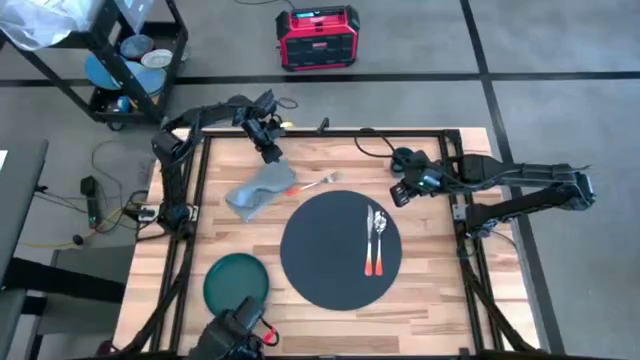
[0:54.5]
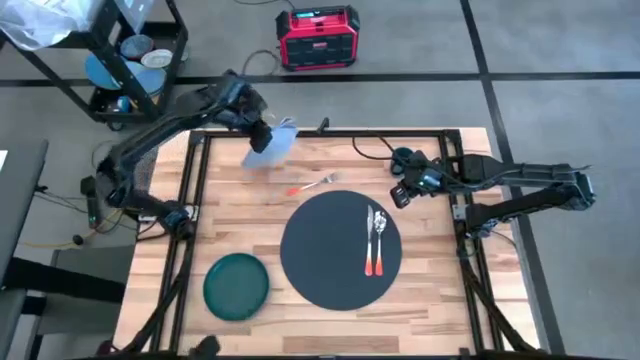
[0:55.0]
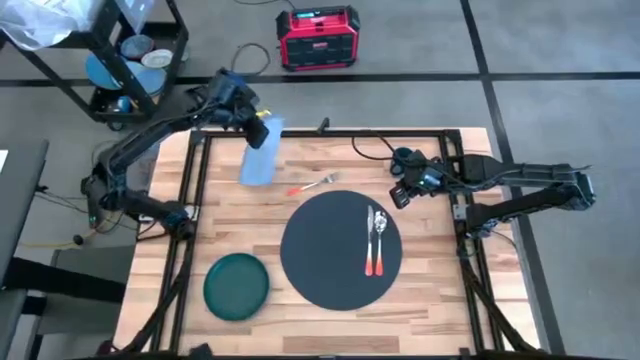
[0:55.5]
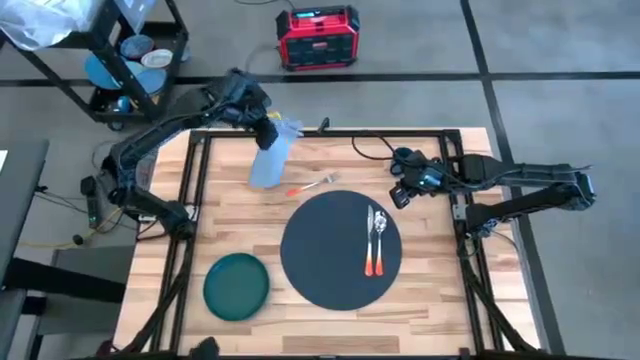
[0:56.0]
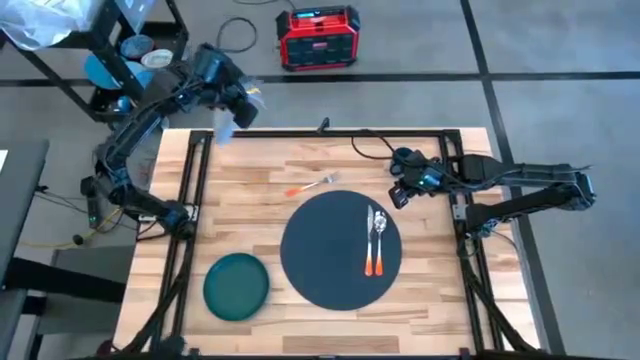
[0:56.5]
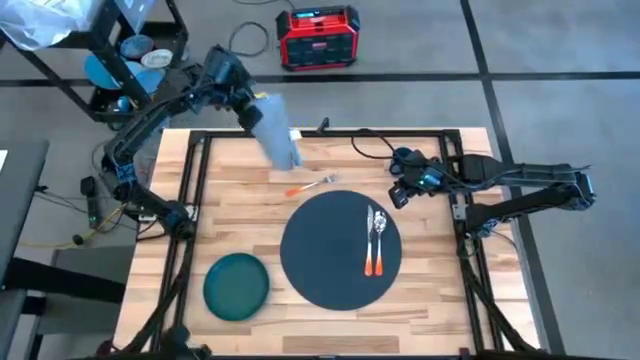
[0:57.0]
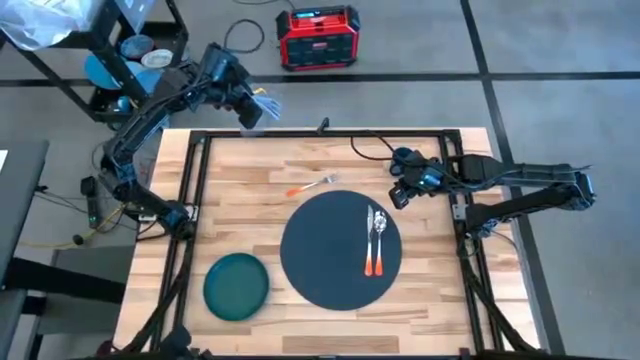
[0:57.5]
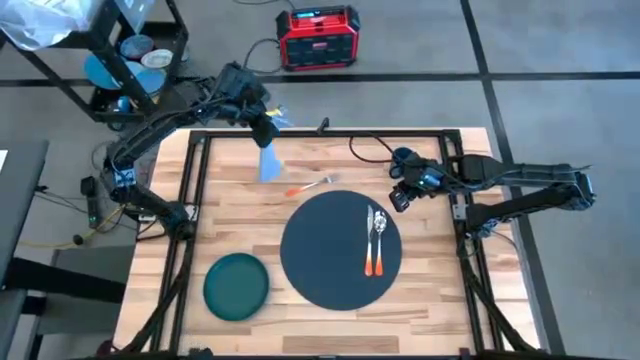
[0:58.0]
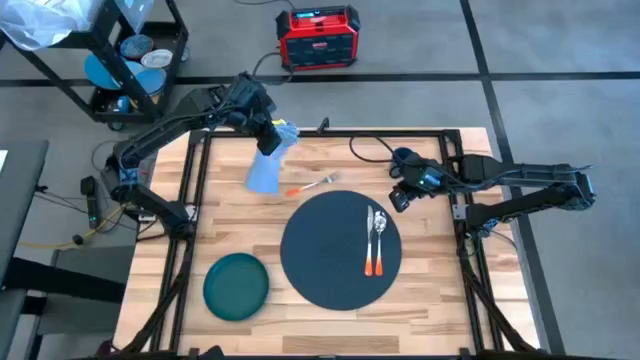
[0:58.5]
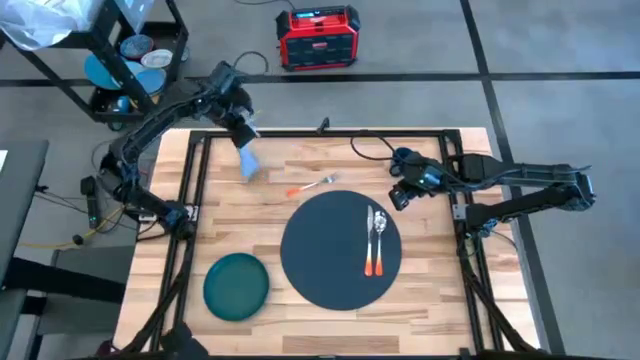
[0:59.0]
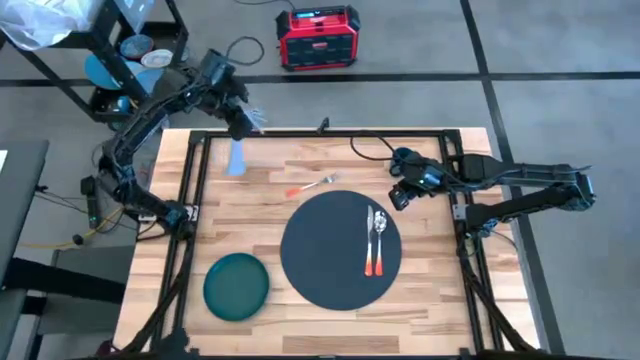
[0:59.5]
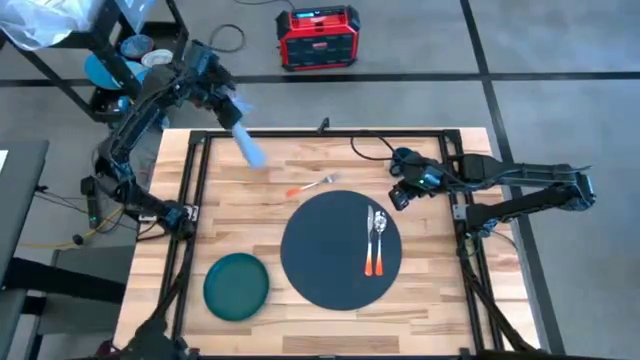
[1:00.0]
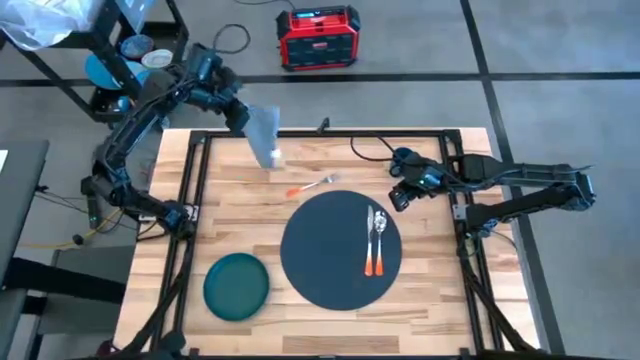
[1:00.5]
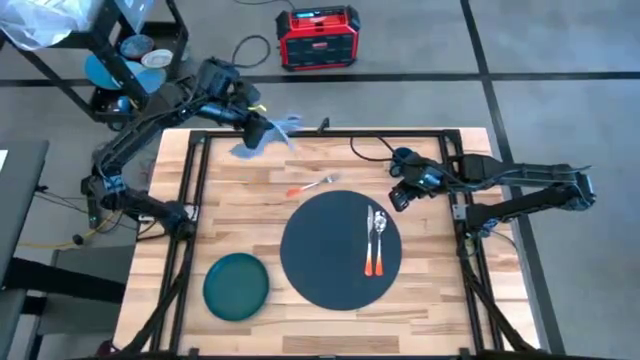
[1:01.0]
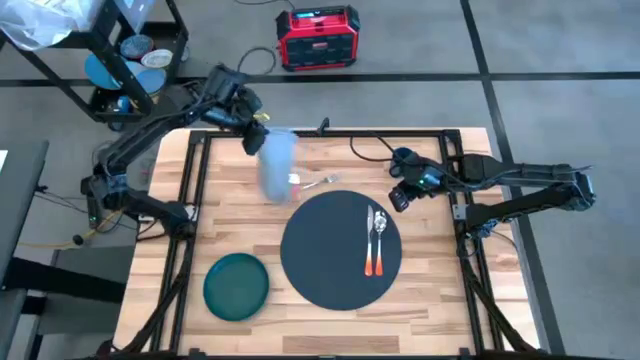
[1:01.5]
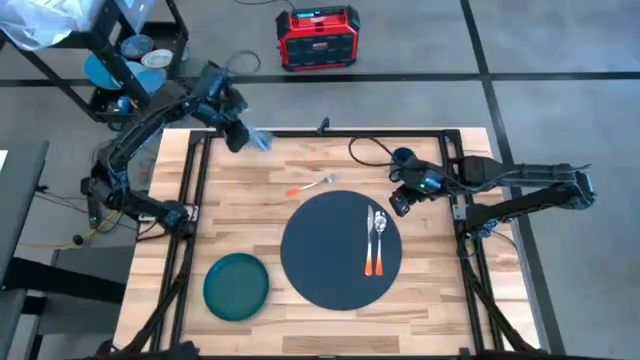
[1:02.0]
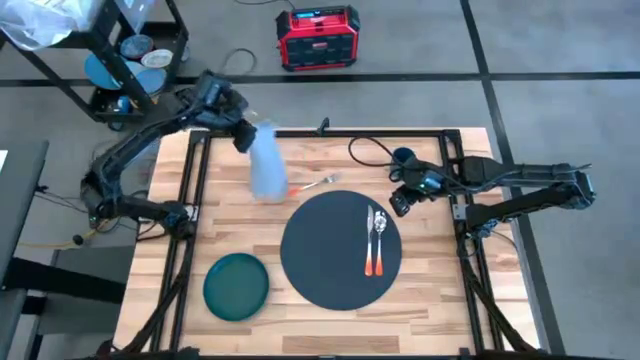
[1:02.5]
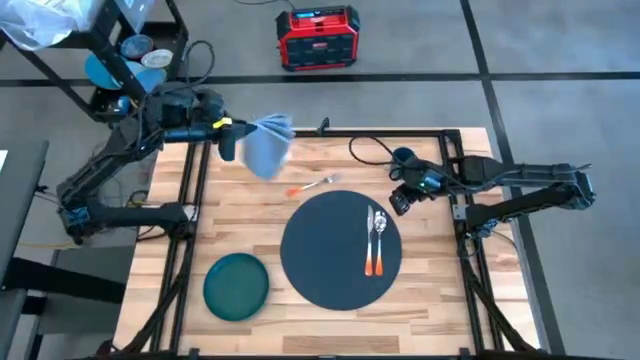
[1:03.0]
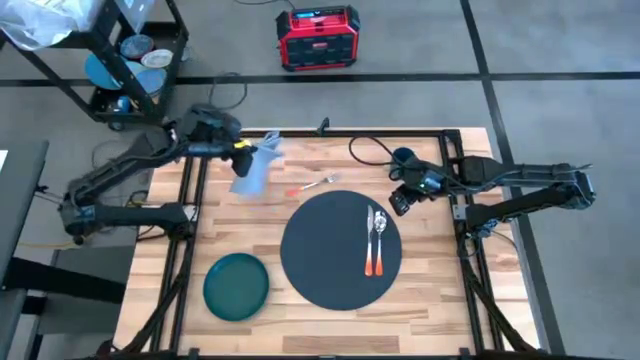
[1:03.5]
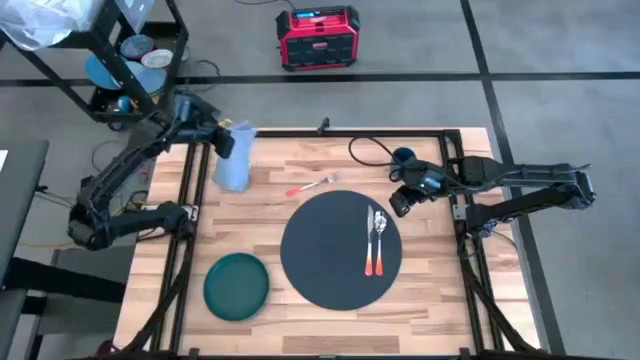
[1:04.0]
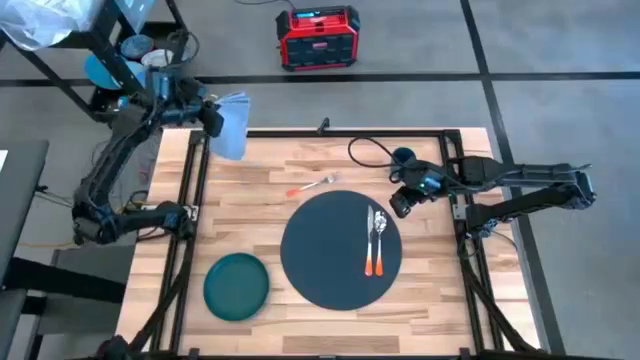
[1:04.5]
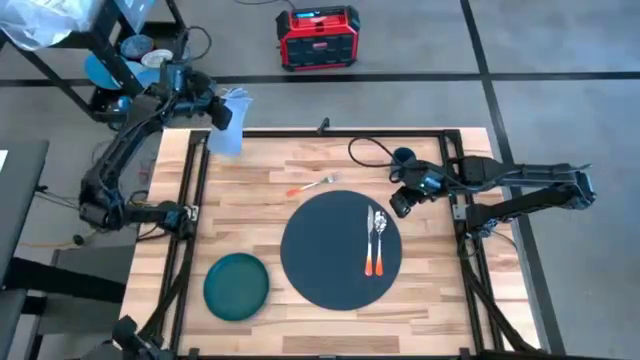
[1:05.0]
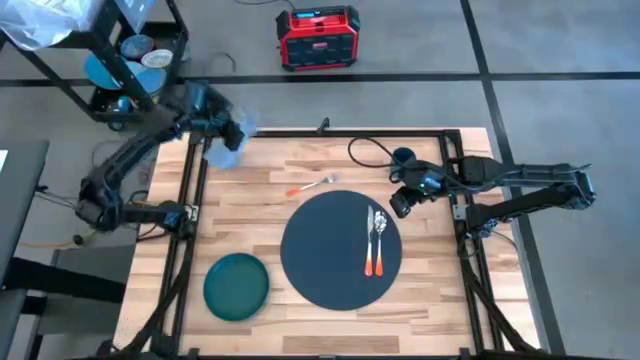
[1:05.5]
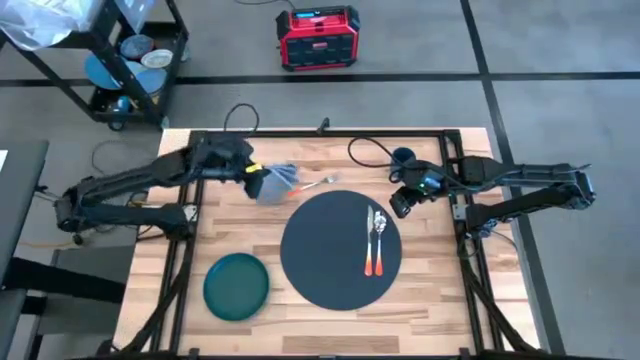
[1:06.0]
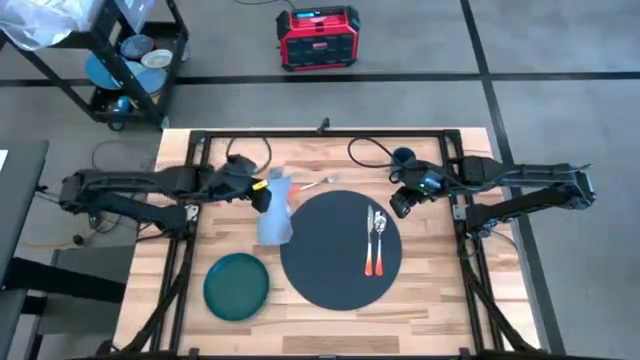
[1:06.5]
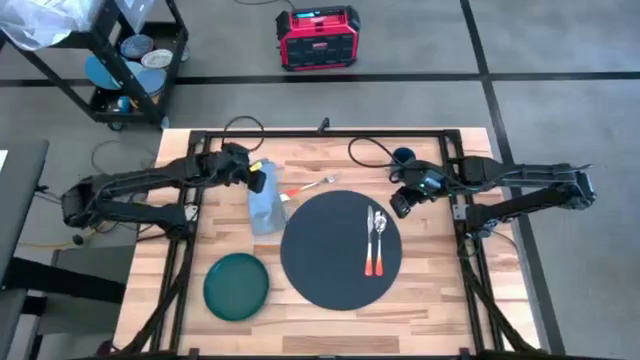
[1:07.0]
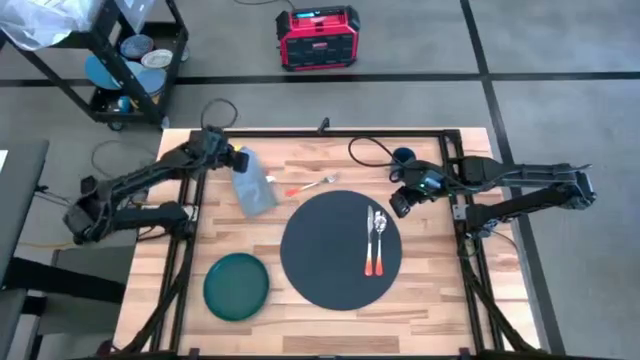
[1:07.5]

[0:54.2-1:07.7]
Task: Set table place
Fold the gray table napkin

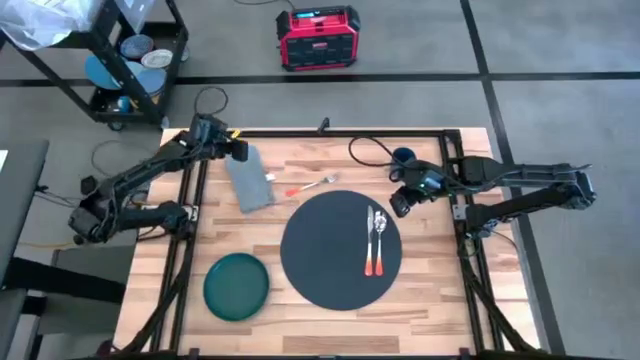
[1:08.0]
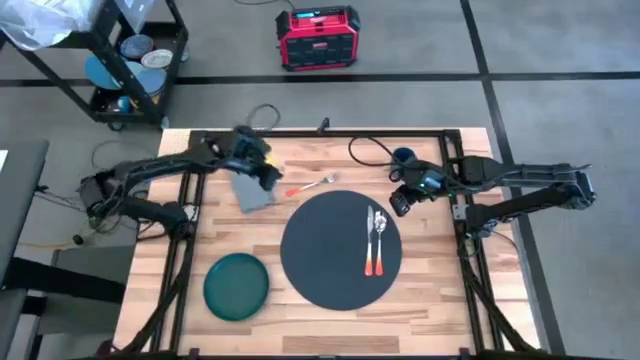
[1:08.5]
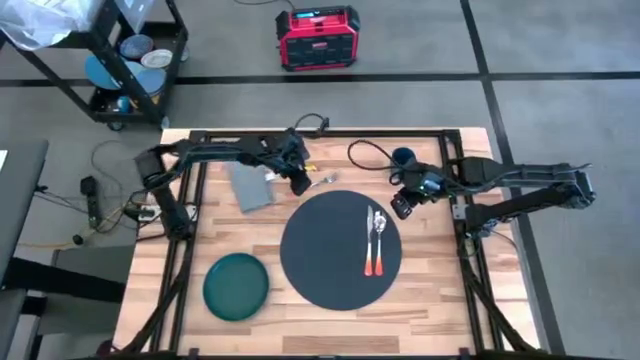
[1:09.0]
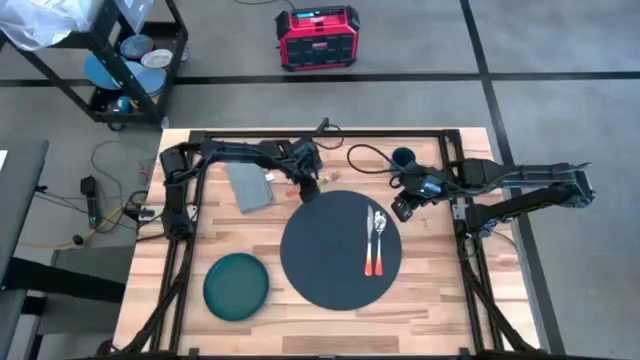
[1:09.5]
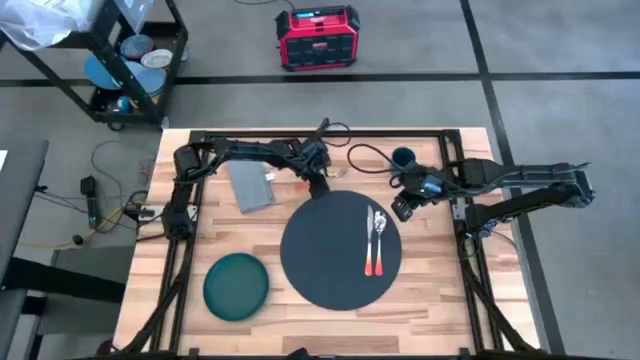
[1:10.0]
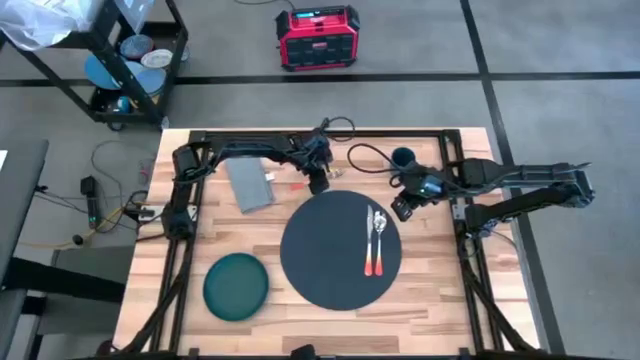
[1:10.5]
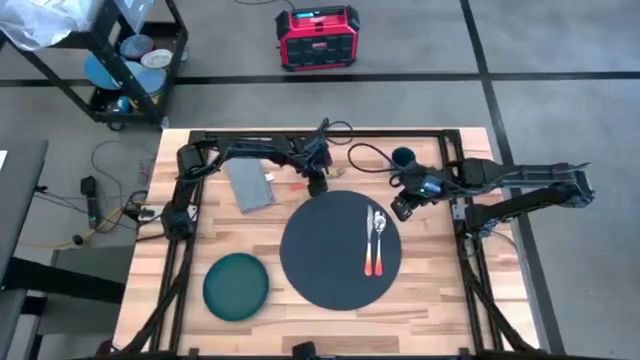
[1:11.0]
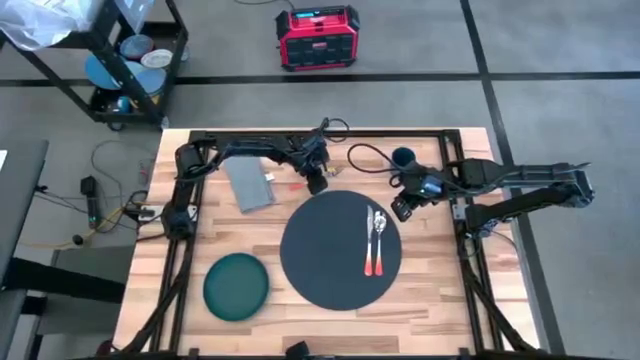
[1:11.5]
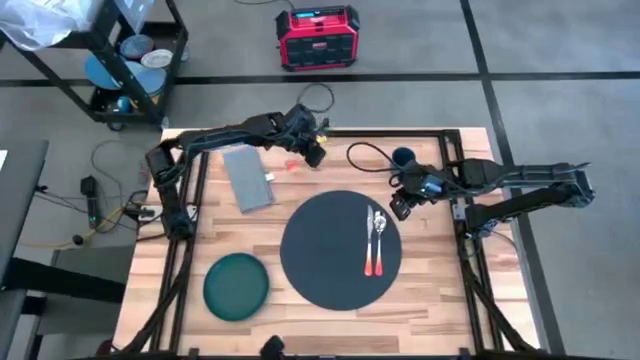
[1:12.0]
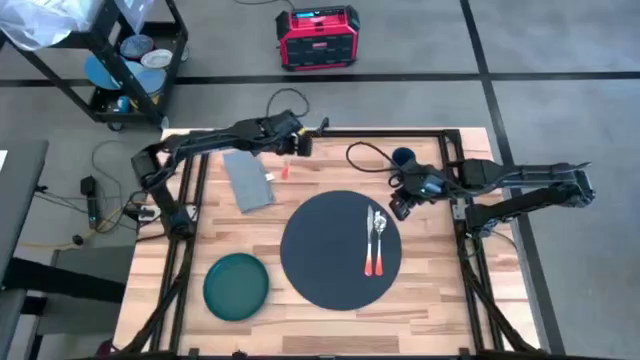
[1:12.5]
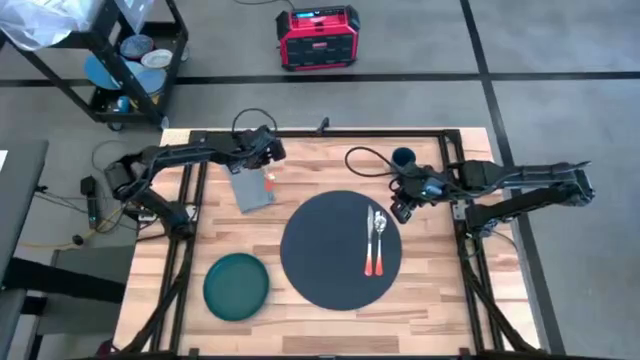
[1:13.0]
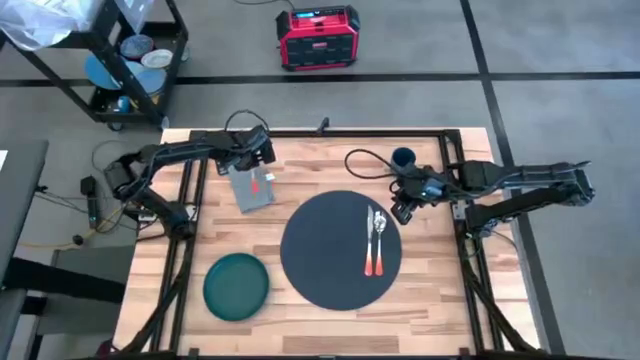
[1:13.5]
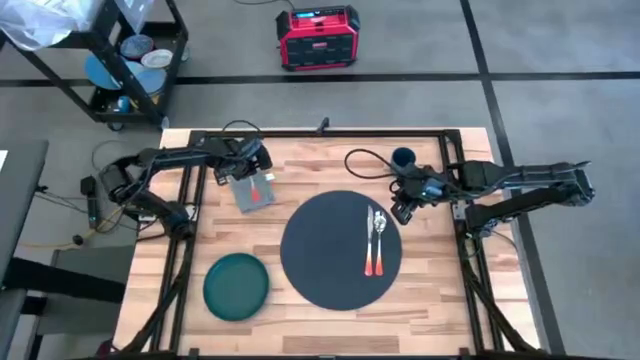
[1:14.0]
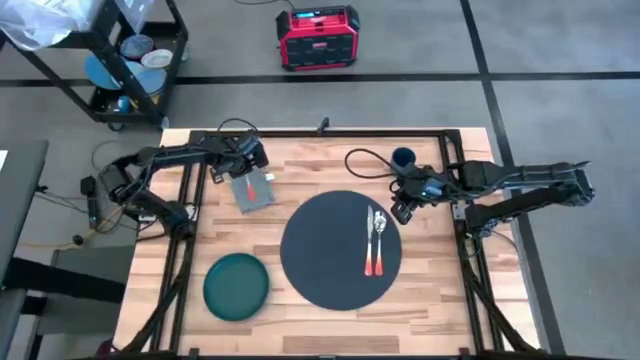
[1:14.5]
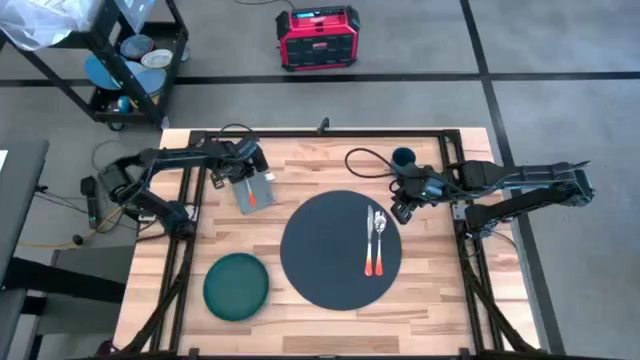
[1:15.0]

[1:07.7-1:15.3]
Put the orange fork on the gray table napkin
